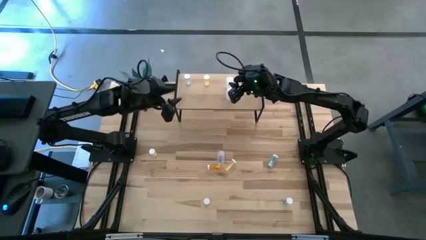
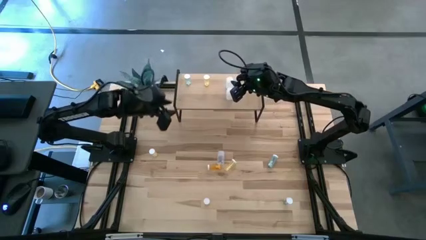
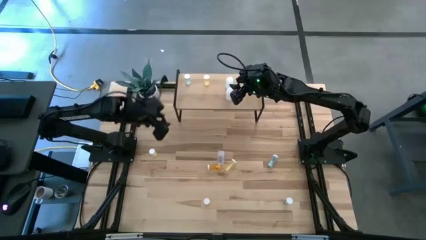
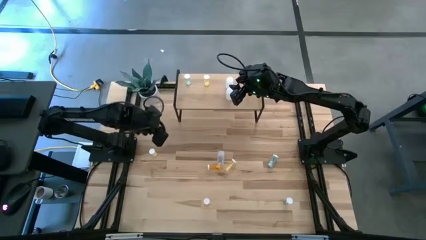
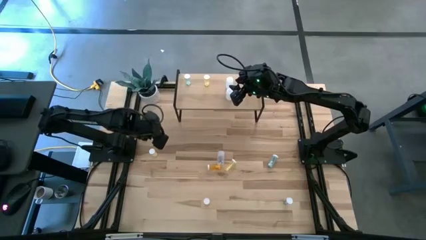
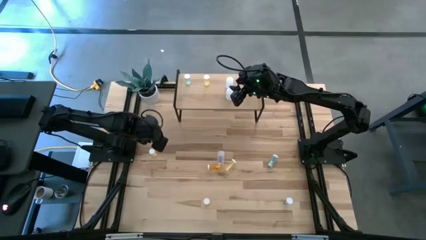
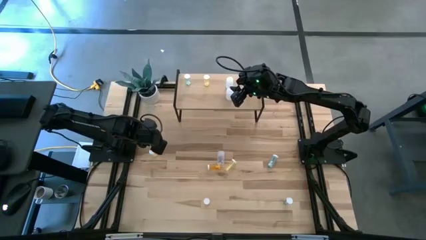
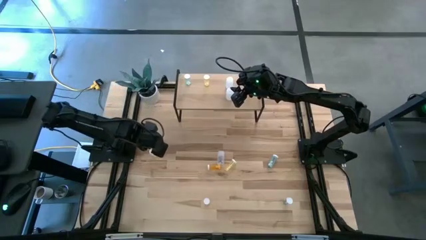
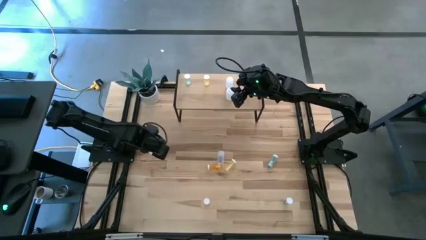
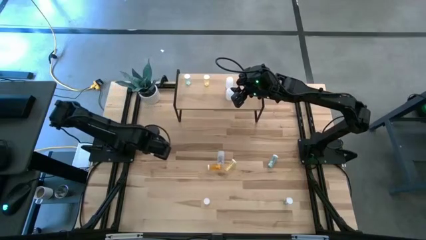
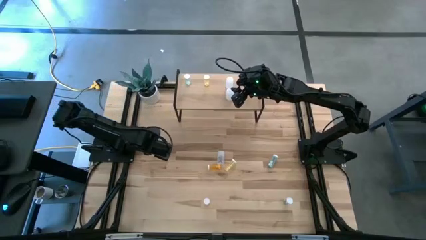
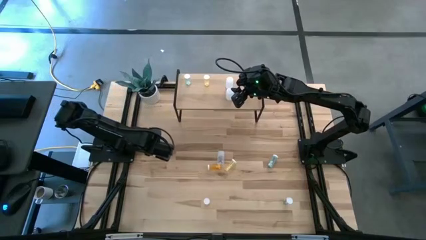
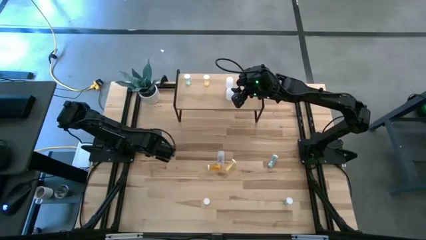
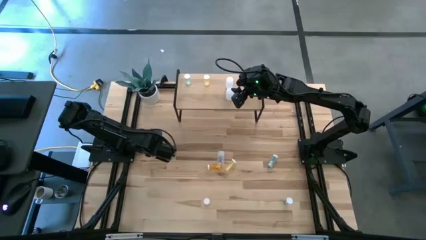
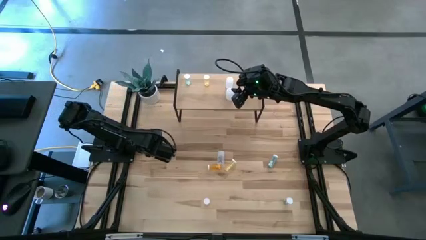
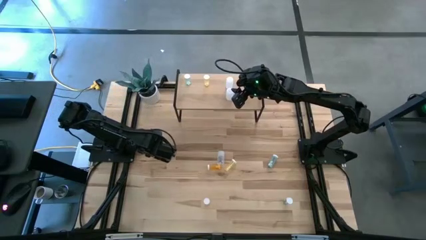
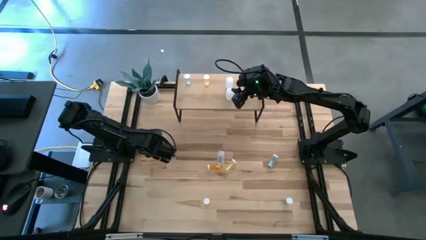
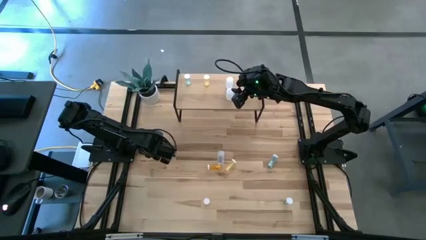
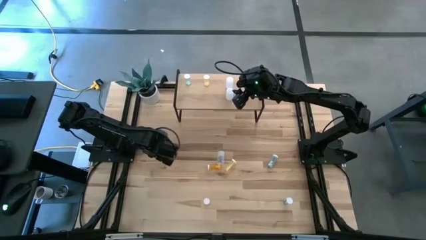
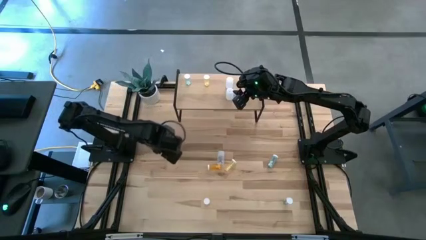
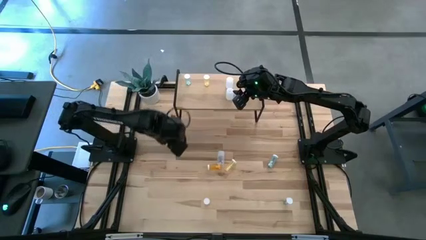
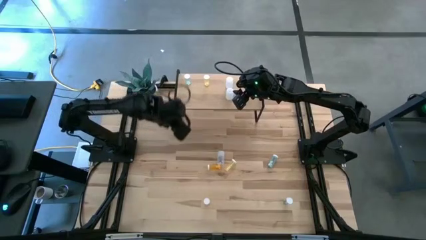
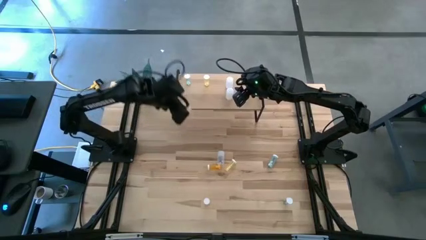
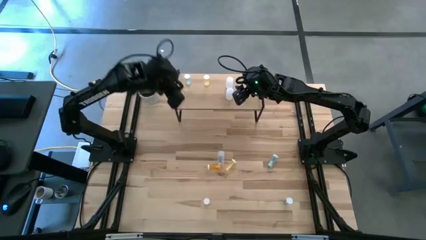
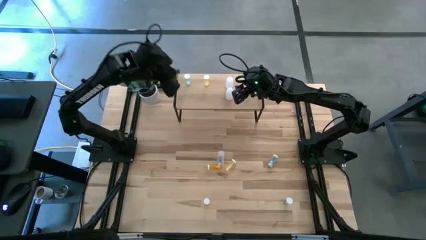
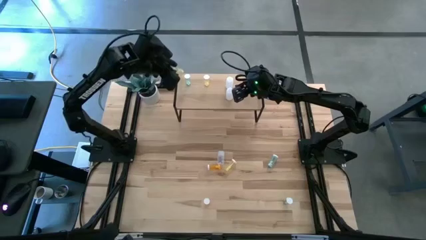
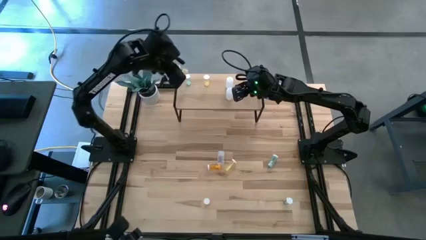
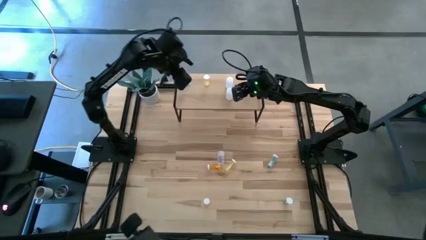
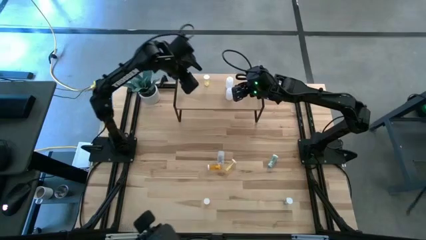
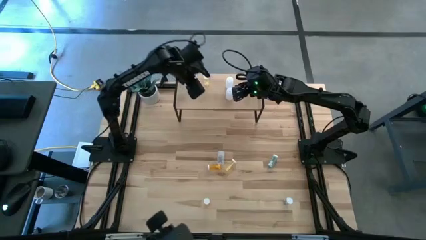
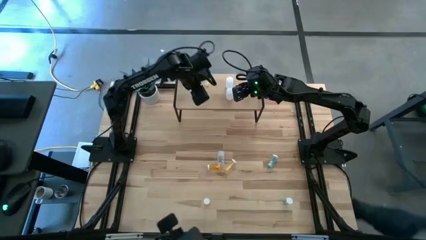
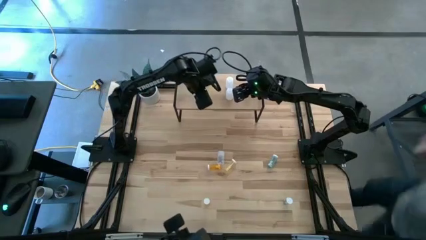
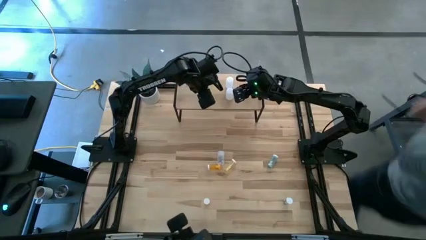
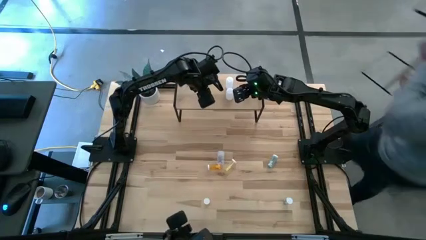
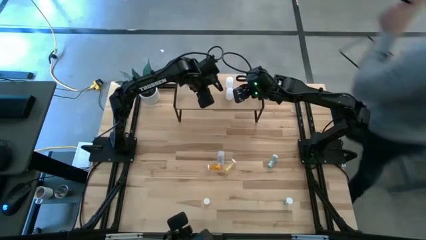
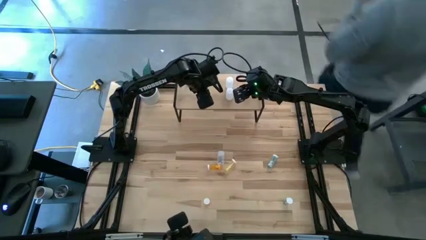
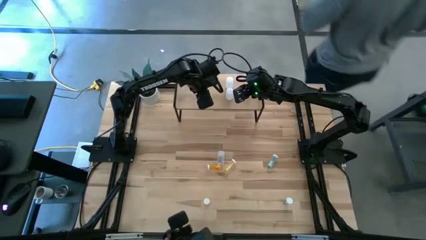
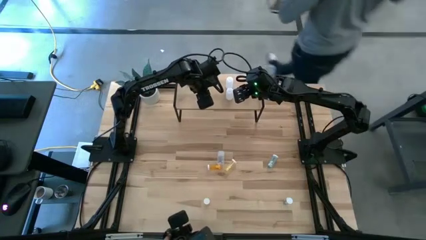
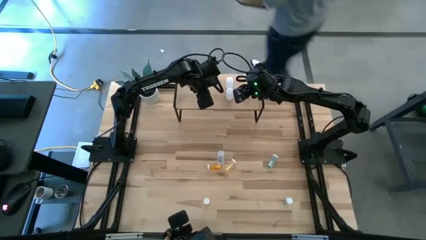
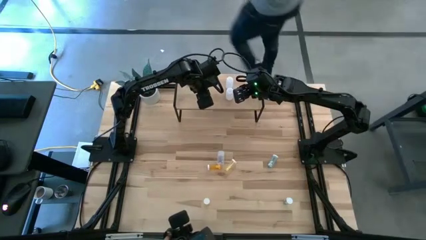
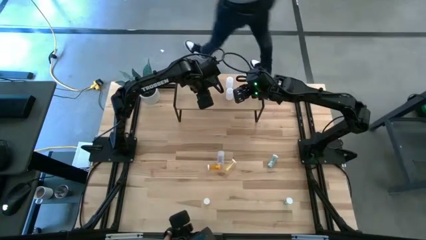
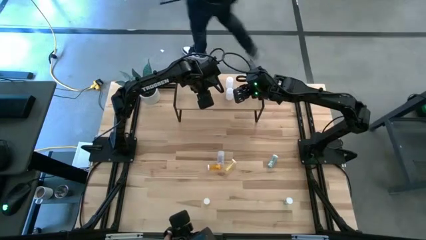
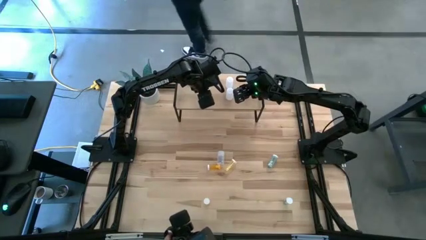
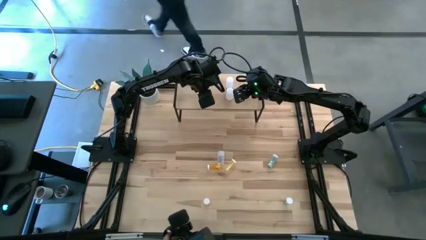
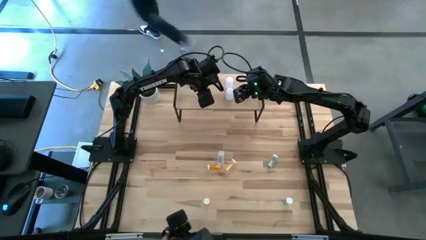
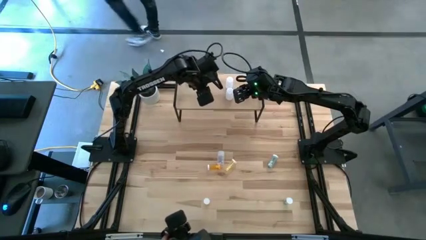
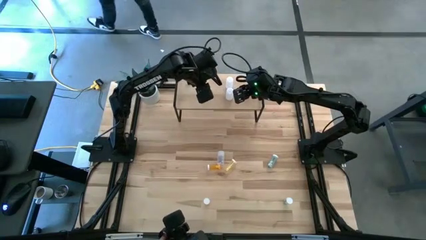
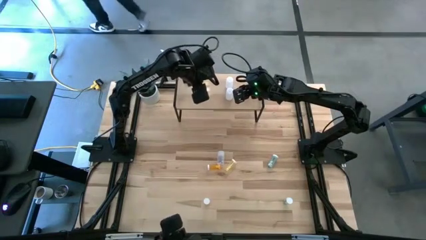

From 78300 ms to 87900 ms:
Task: Pick and place medicine bottles onto shelf by color
Put the left yellow pill bottle aligned with the other yellow pill bottle on the shelf
